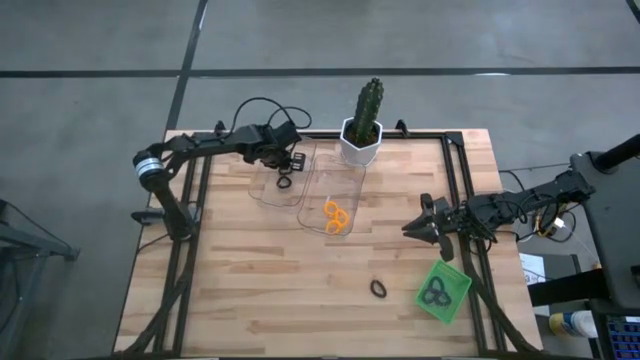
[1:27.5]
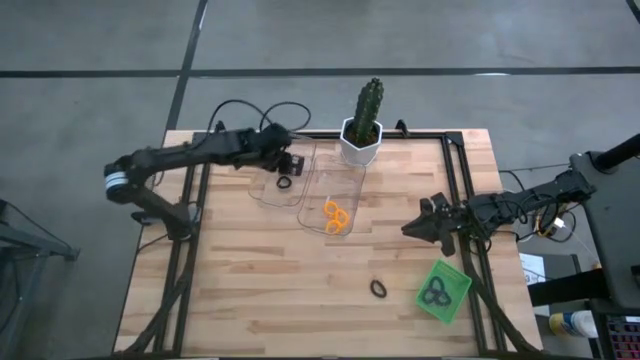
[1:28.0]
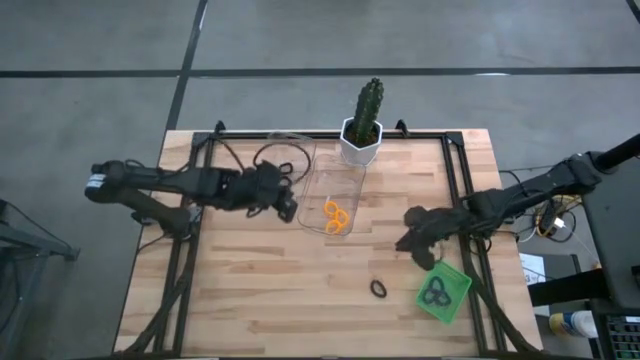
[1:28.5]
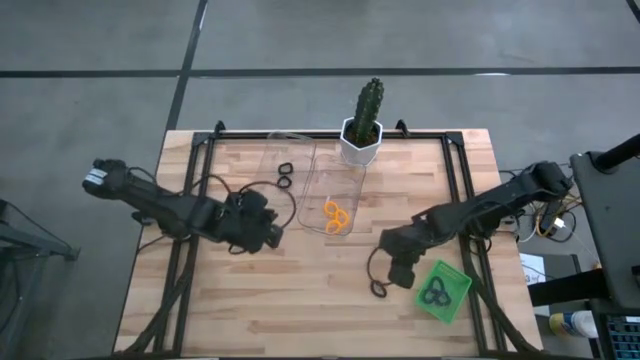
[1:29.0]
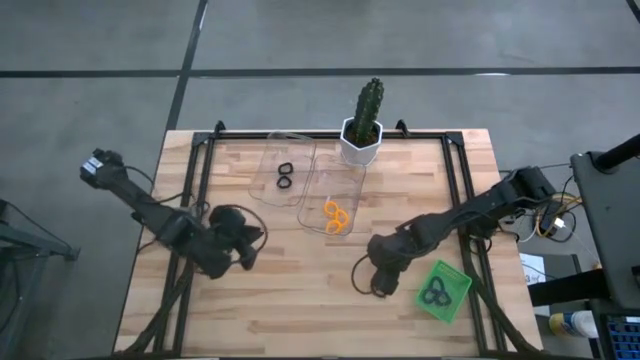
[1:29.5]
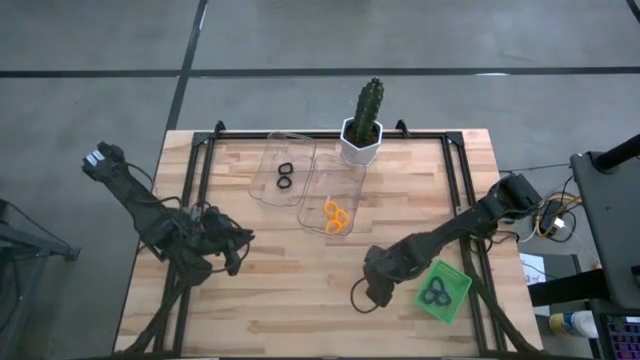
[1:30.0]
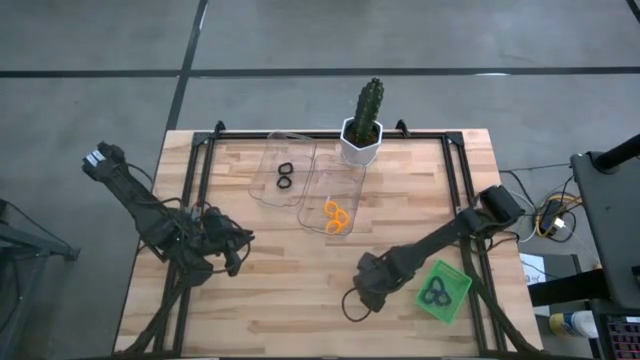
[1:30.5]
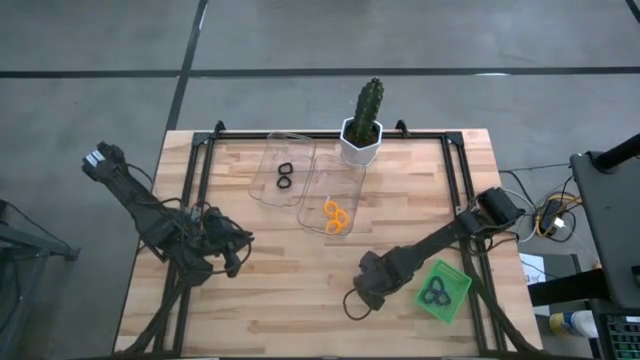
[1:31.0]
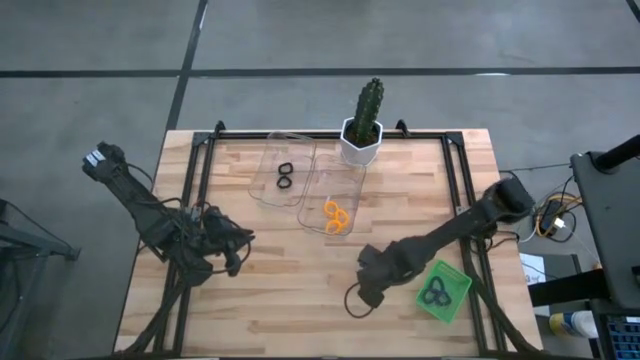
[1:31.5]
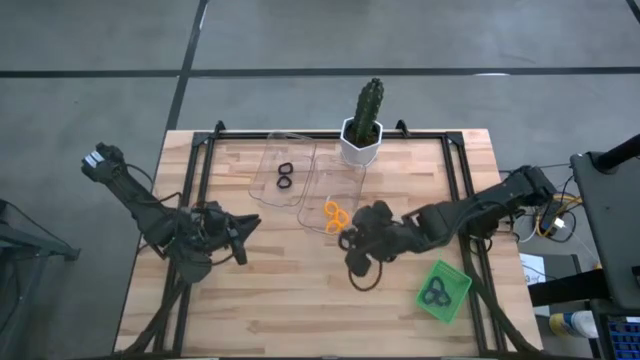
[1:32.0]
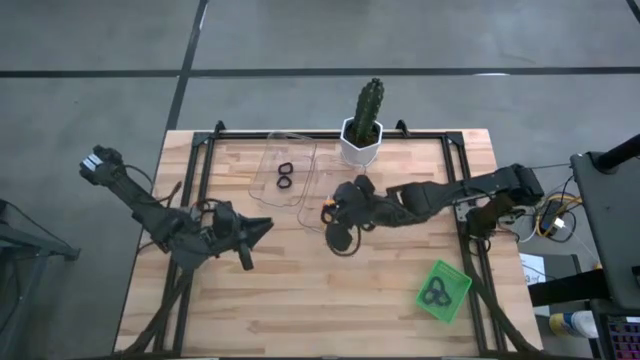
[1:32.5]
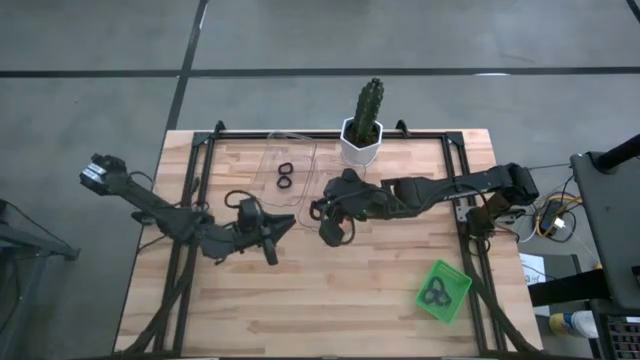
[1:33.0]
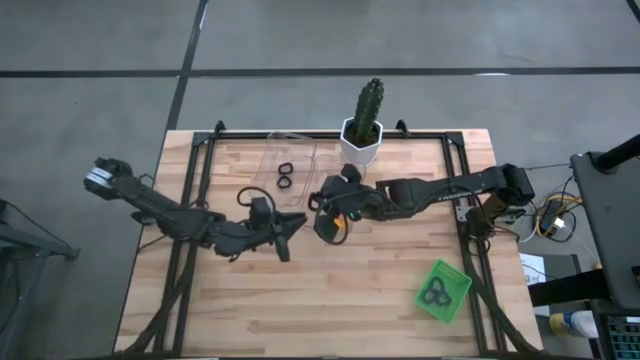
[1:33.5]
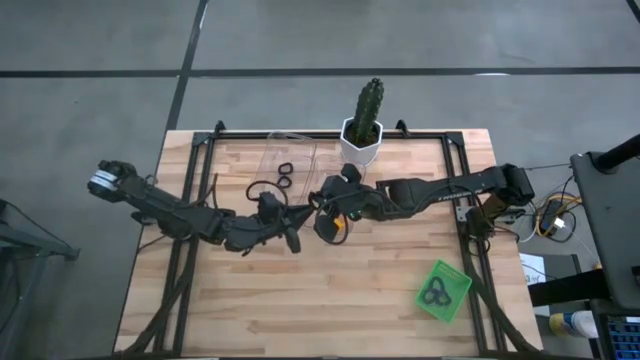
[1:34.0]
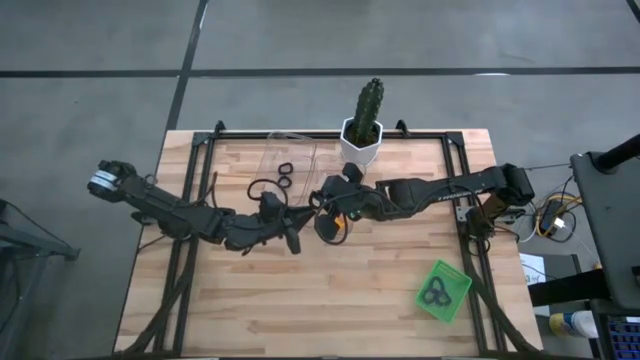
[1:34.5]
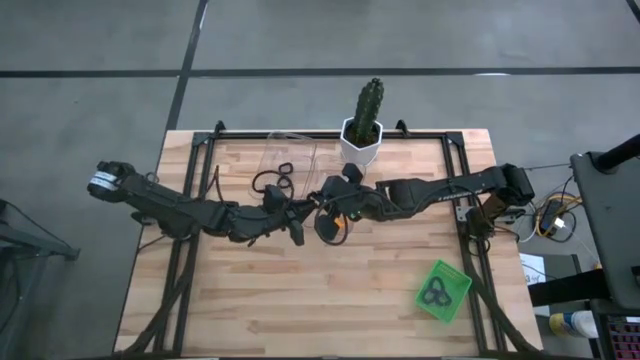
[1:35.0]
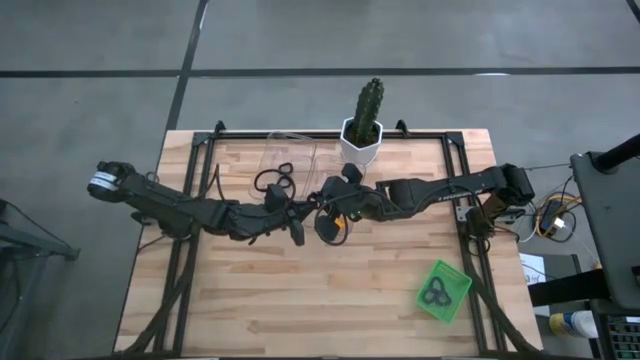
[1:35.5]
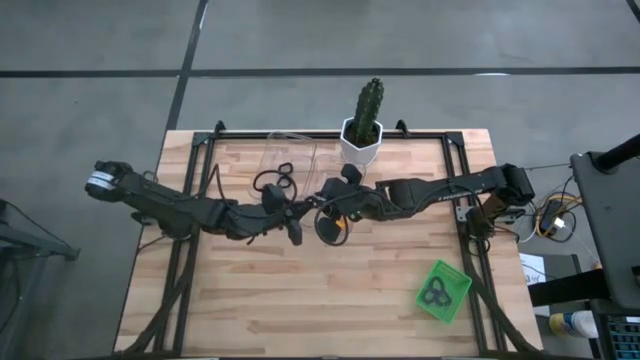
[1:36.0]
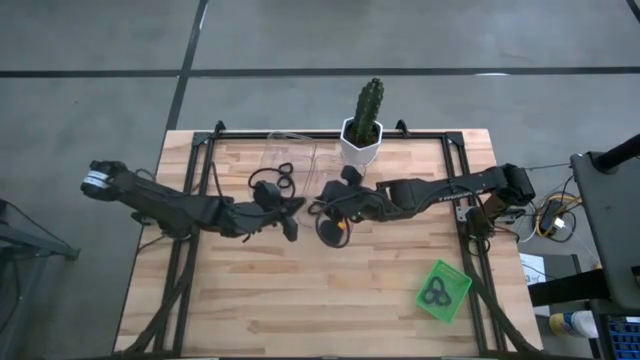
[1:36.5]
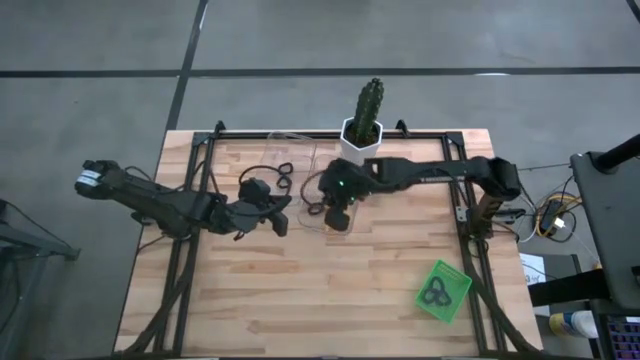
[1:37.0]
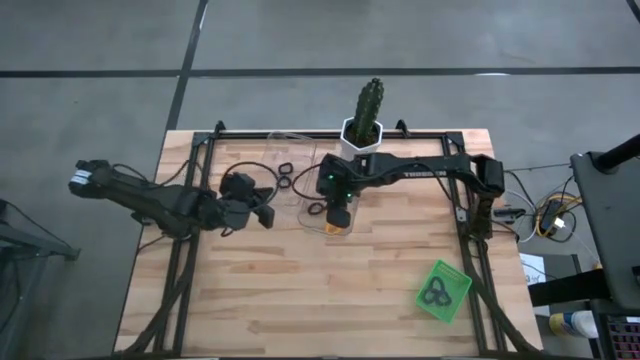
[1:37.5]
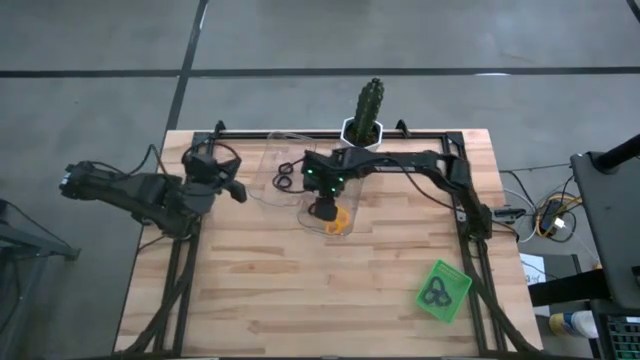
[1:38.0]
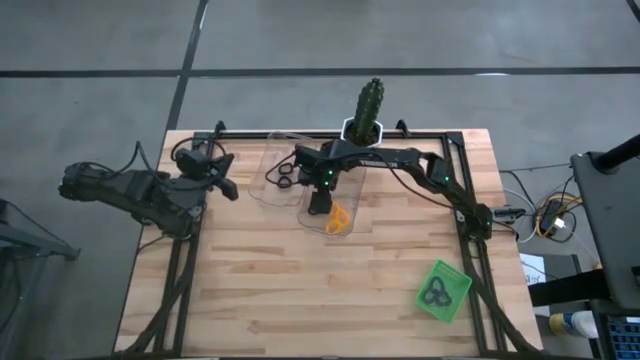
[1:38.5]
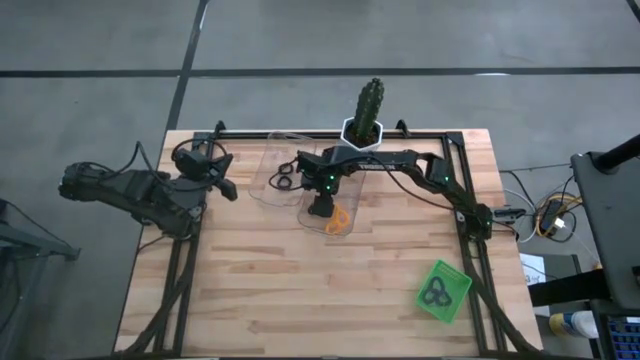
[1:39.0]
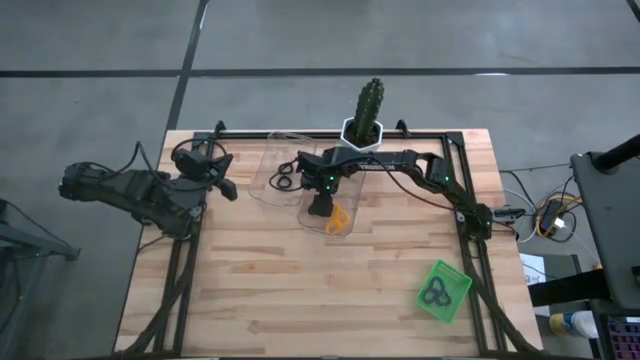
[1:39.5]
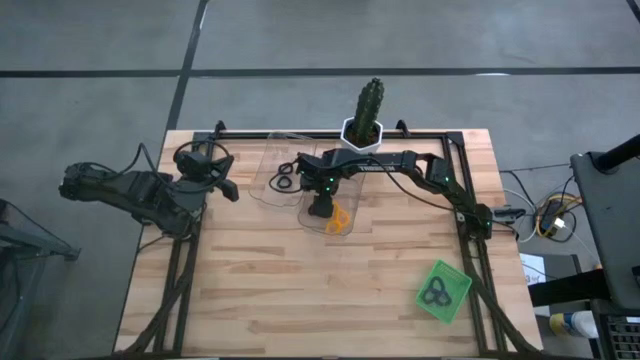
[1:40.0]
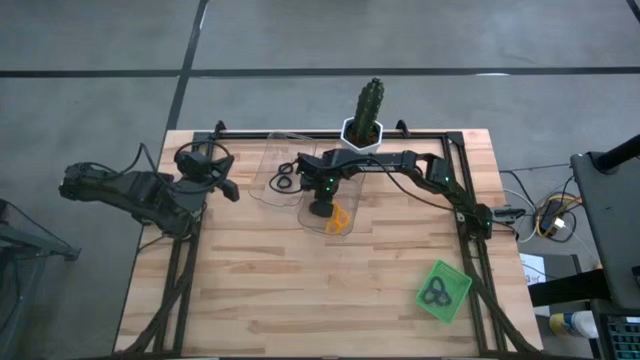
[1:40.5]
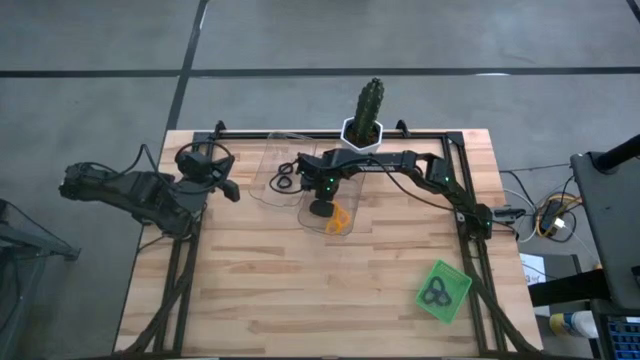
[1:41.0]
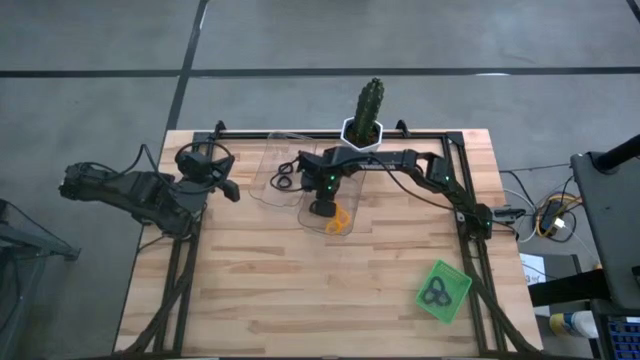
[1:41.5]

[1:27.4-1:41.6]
Task: Sort items
Put the black keychain into the left transparent bin

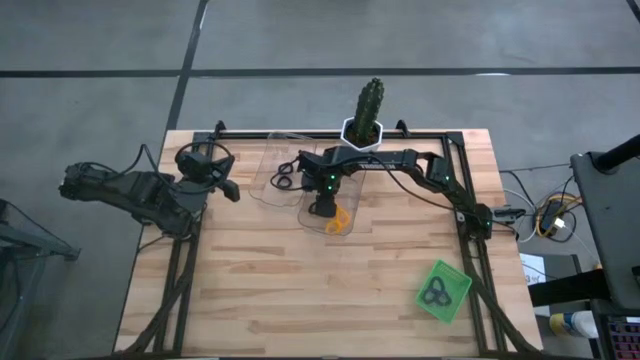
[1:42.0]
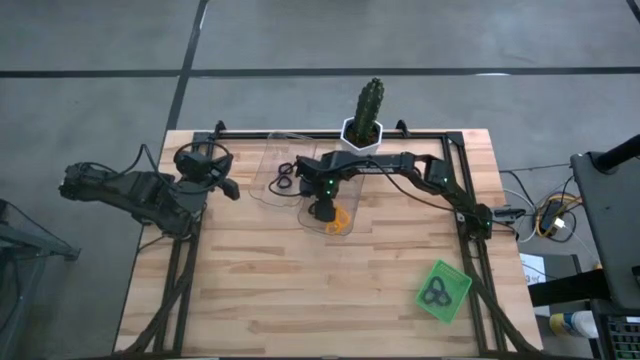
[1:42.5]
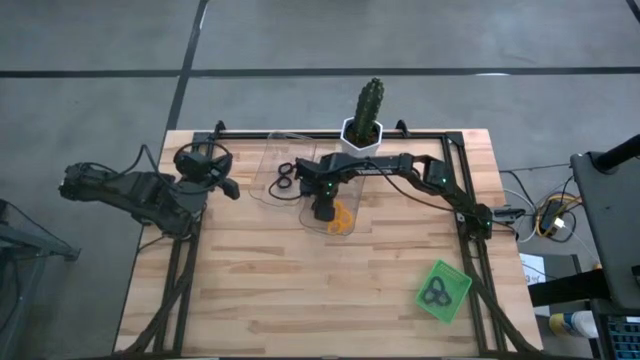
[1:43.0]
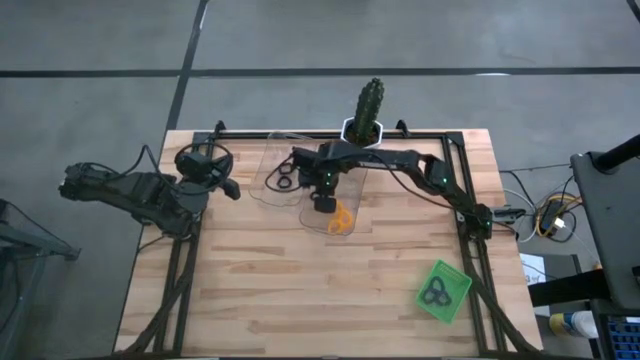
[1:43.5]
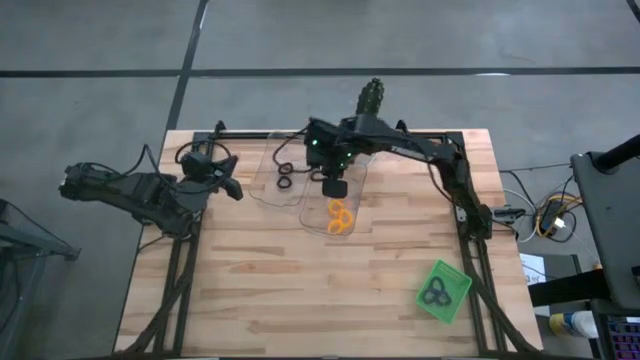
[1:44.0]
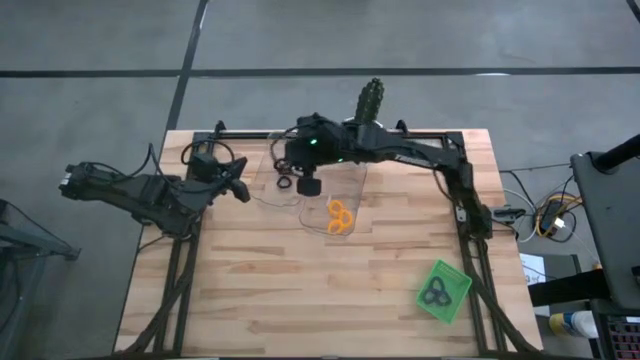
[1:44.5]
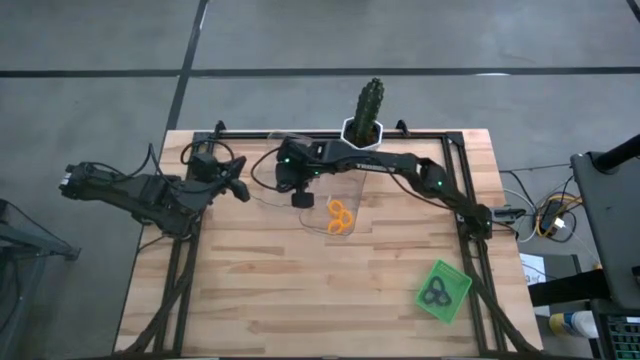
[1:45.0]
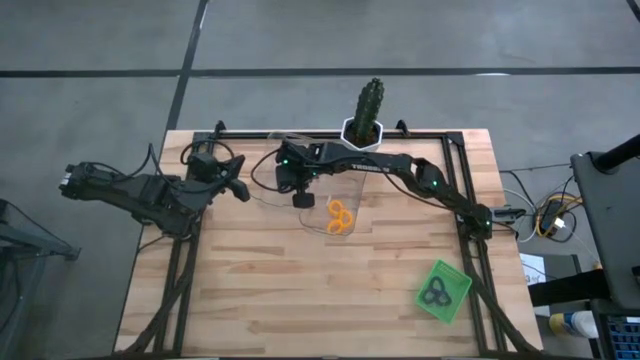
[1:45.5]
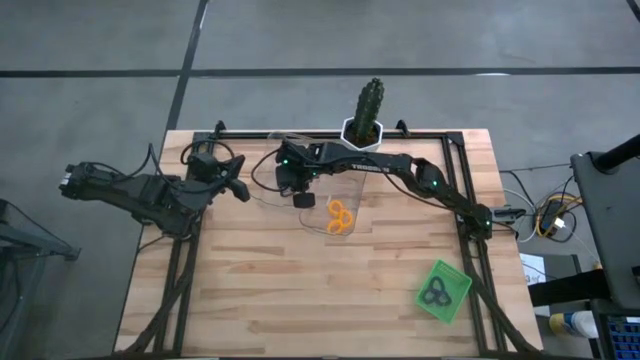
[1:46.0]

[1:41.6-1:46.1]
Put the black keychain into the left transparent bin

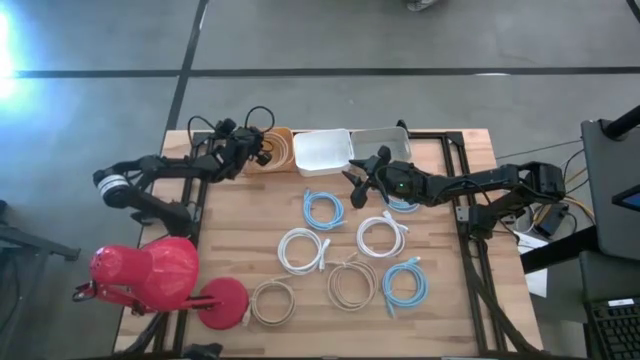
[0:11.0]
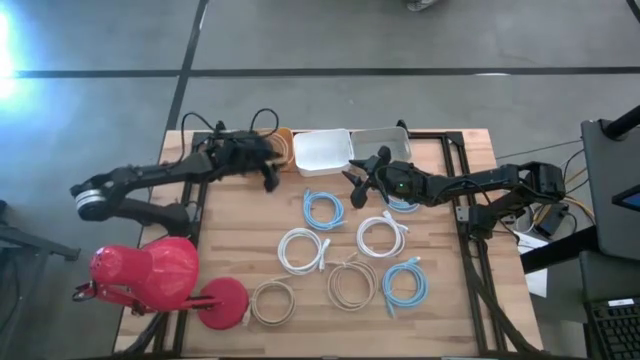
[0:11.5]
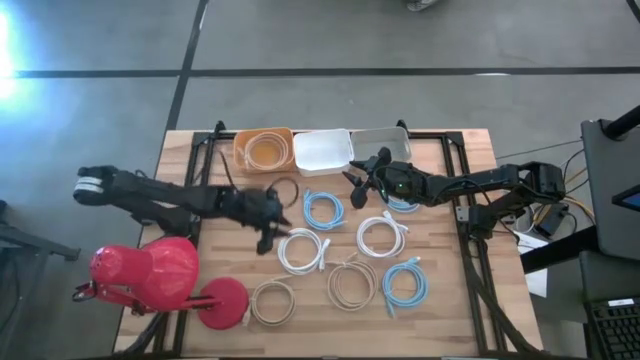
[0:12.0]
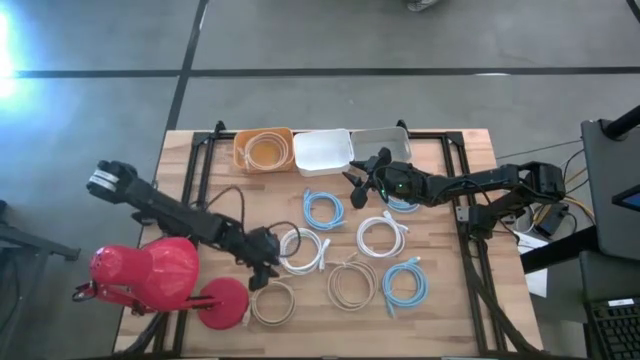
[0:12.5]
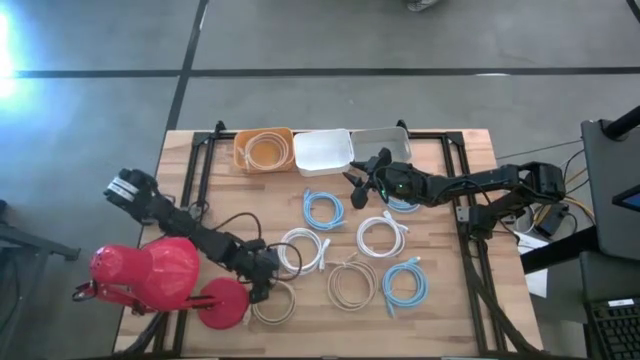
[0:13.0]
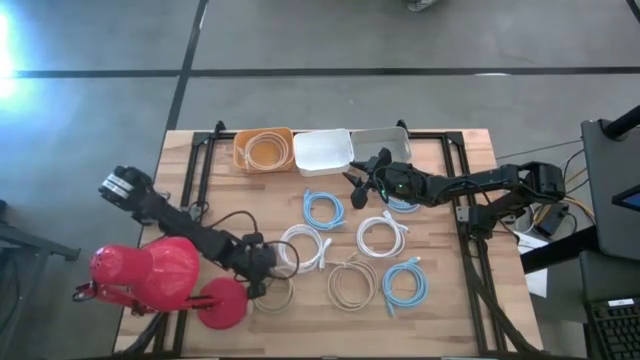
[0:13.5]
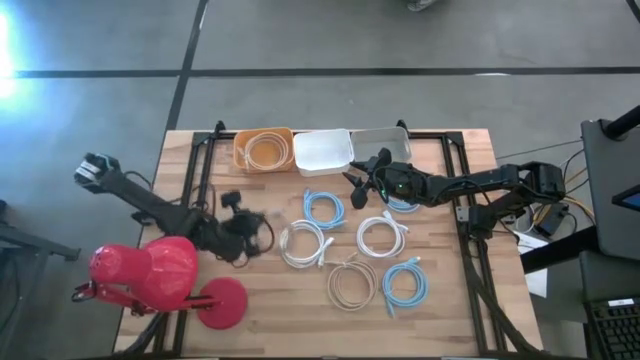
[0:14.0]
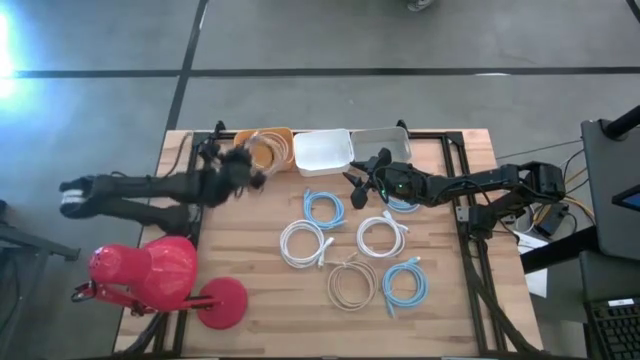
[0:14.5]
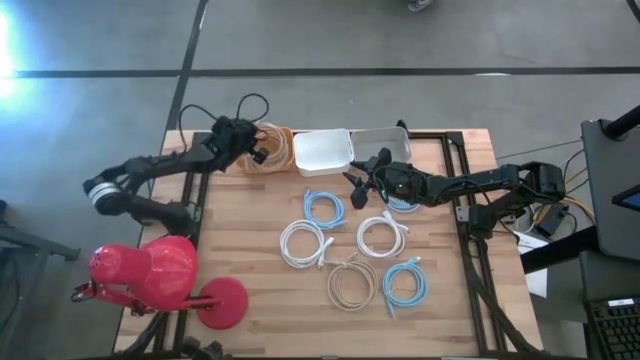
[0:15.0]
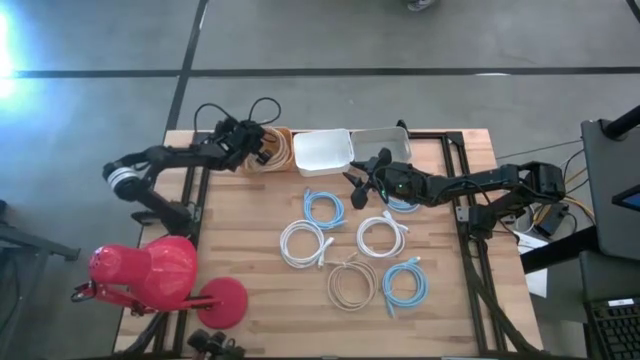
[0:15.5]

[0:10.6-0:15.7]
Task: Sort HDMI cables
Put the brown hdmi cable into the yellow bin
